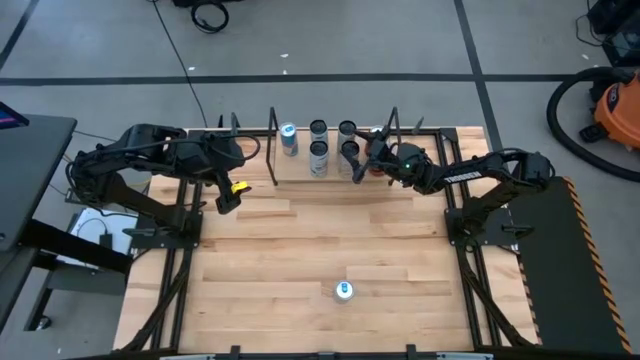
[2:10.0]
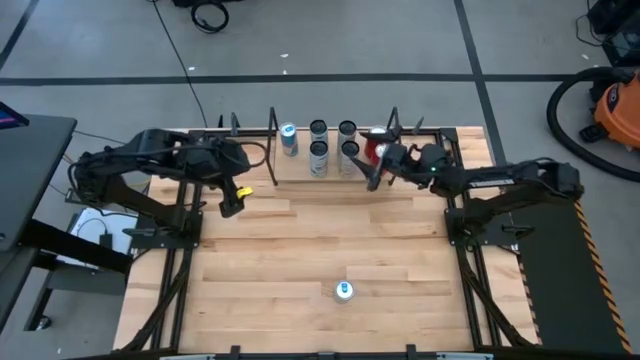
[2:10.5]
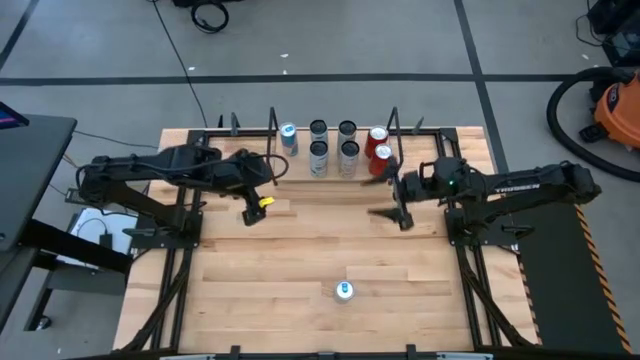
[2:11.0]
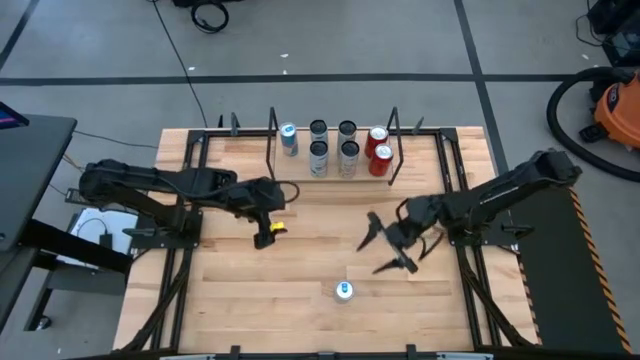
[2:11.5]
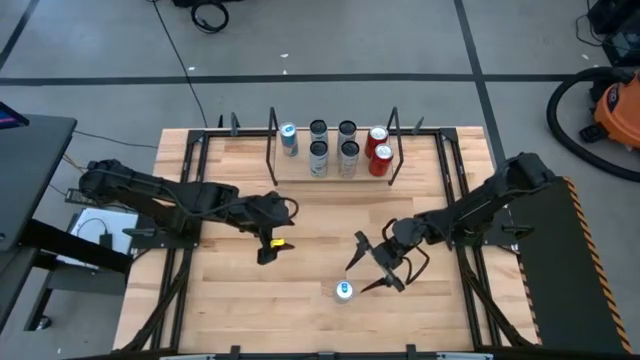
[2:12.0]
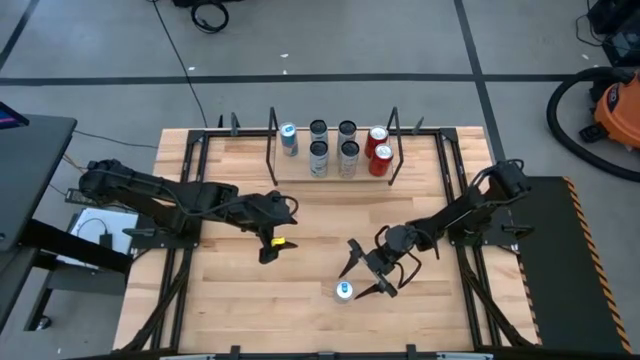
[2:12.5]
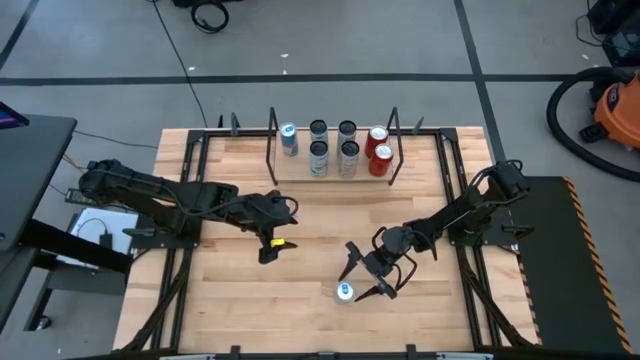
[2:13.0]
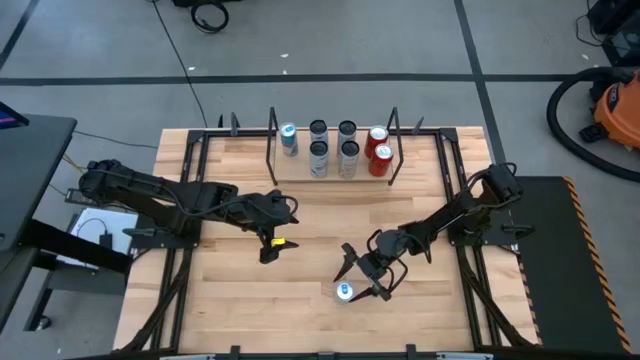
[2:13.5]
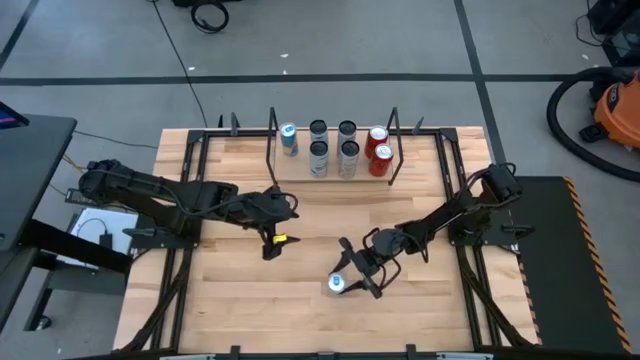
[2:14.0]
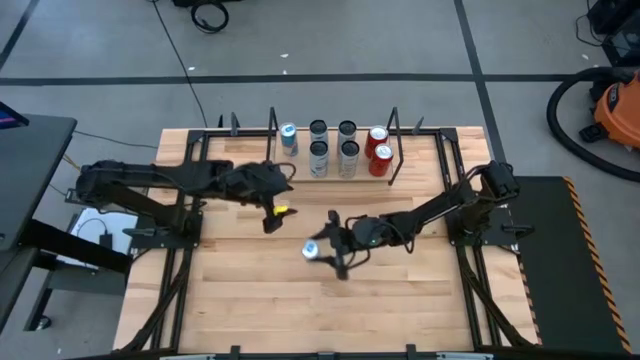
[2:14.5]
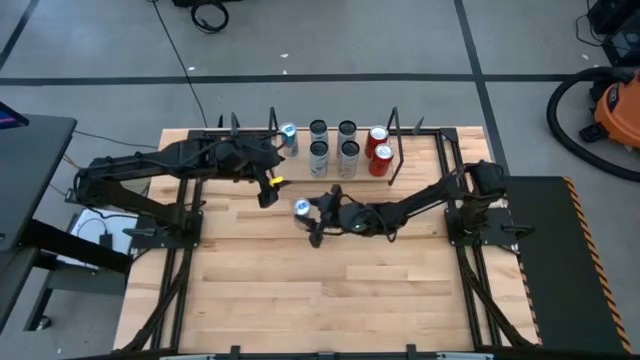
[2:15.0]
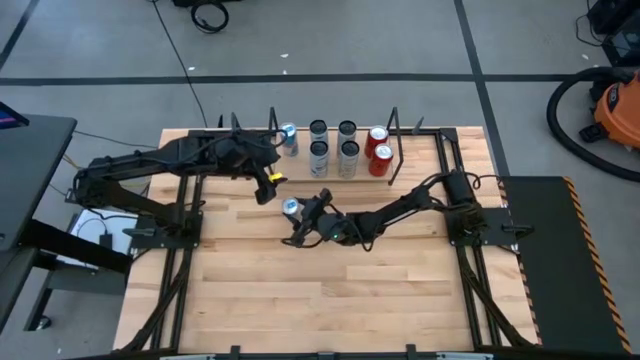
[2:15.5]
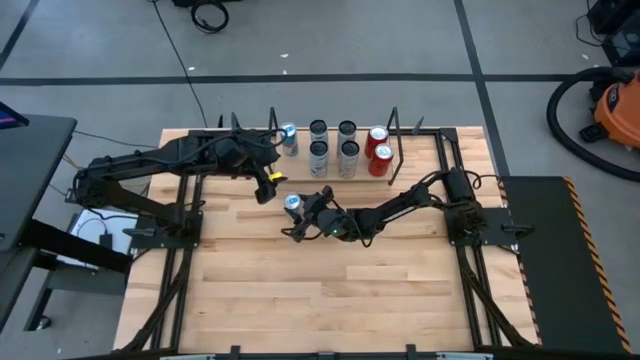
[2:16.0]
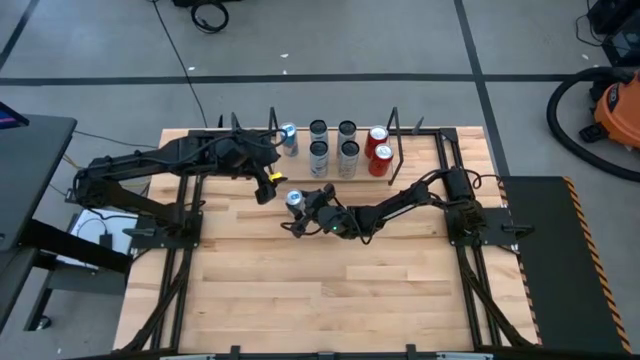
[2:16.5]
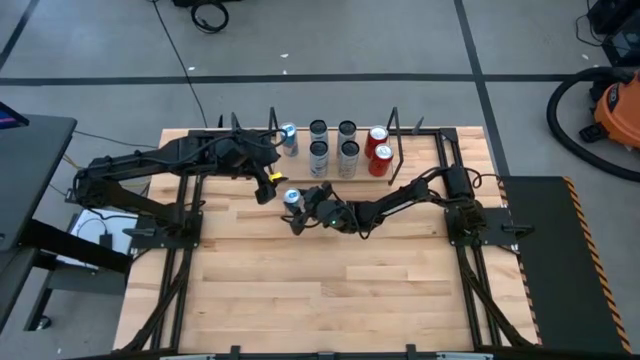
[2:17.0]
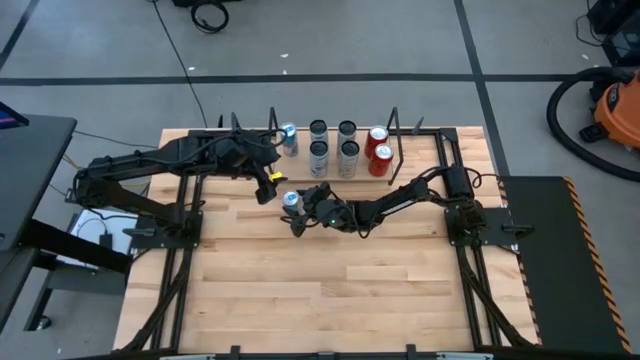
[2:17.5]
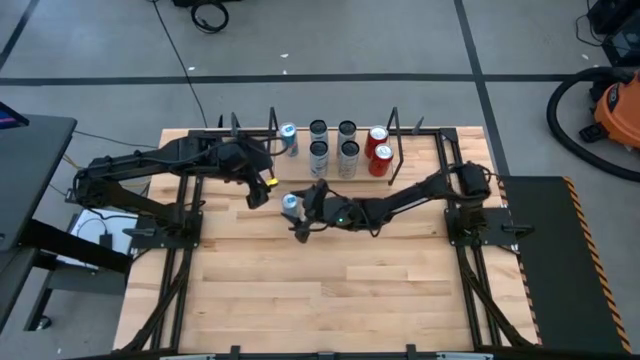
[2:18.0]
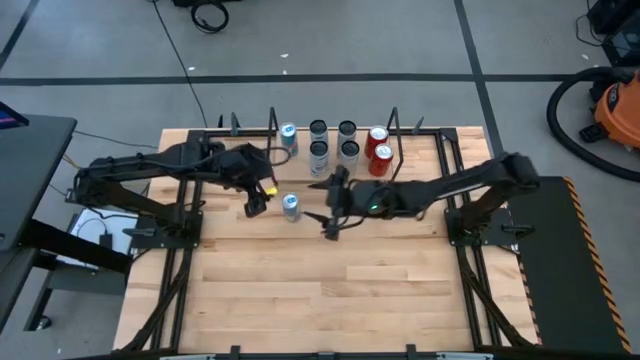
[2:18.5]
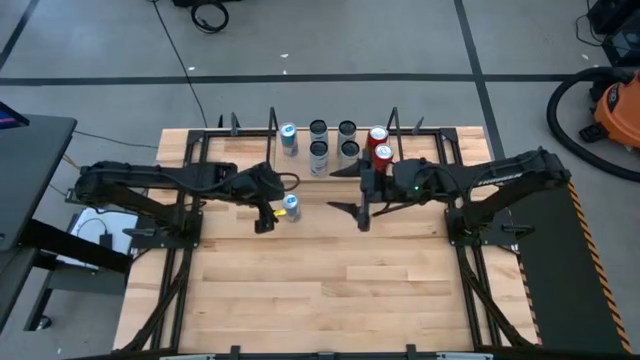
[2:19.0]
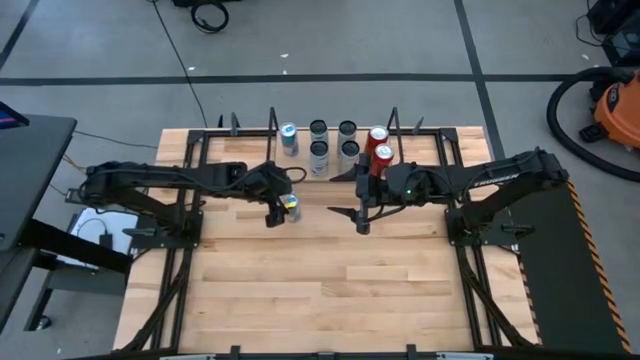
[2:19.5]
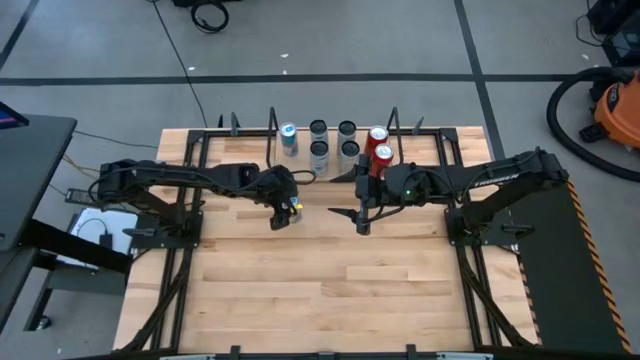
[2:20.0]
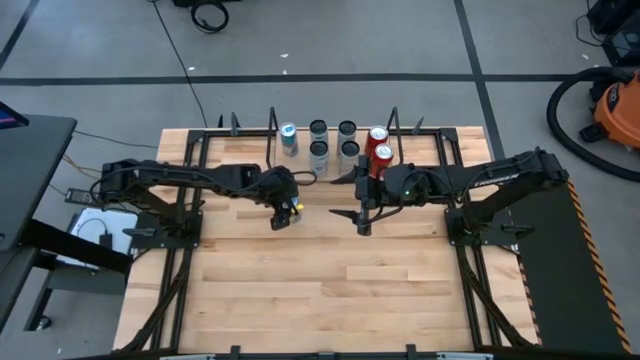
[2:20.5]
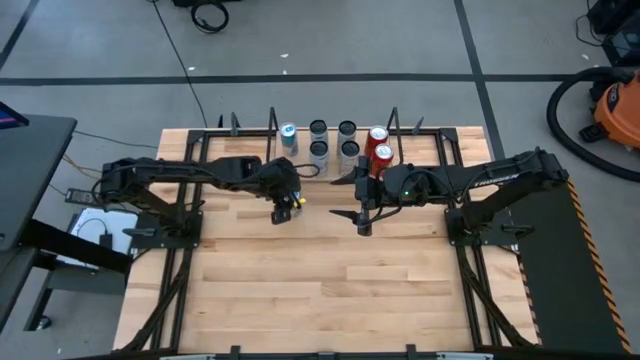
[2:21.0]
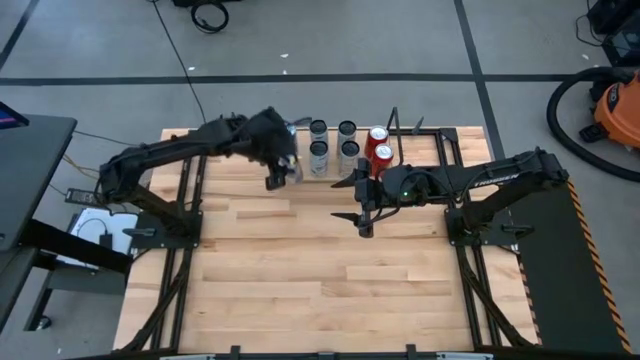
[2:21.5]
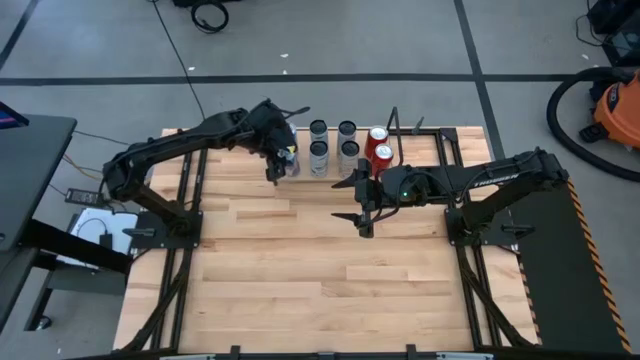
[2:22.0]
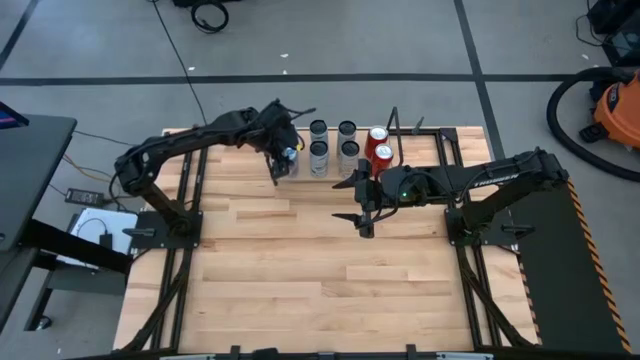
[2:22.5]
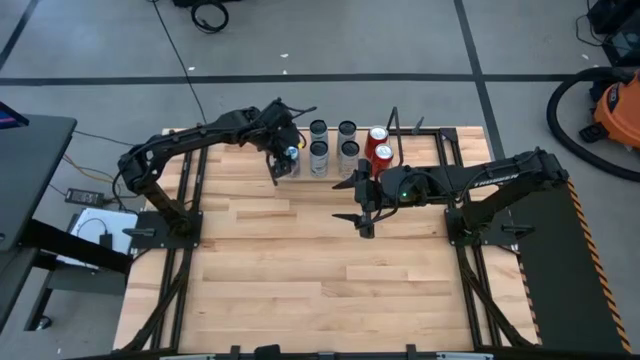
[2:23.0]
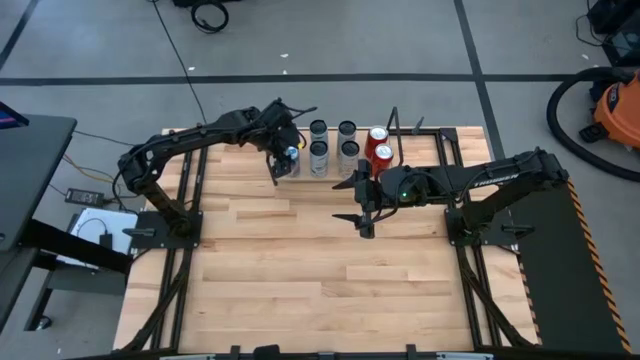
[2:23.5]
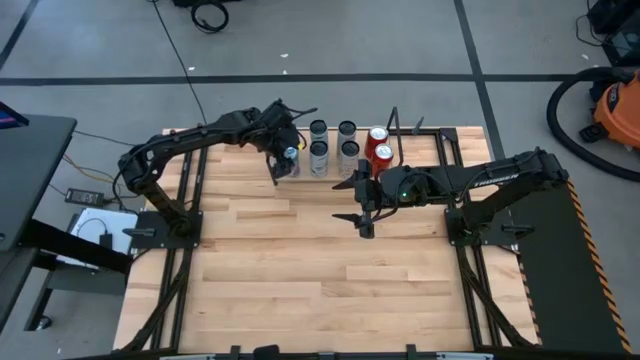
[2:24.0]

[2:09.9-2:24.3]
Task: Place canned beverage on shelf
Put the blue soda can aligned with the other blue soda can on the shelf

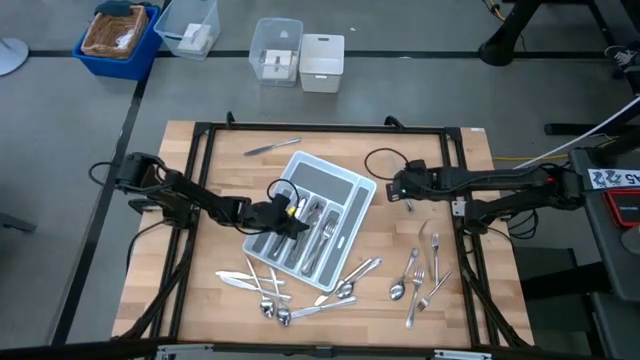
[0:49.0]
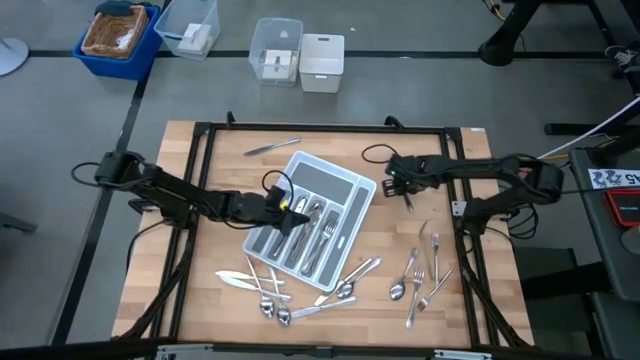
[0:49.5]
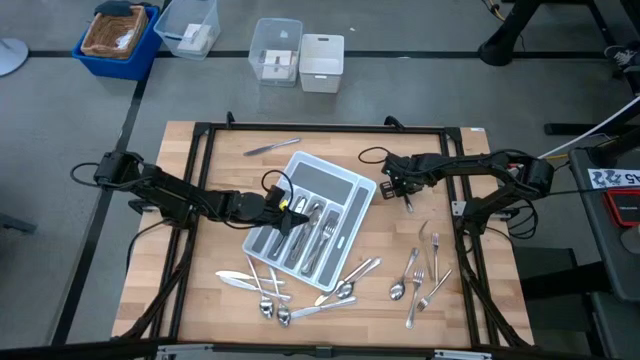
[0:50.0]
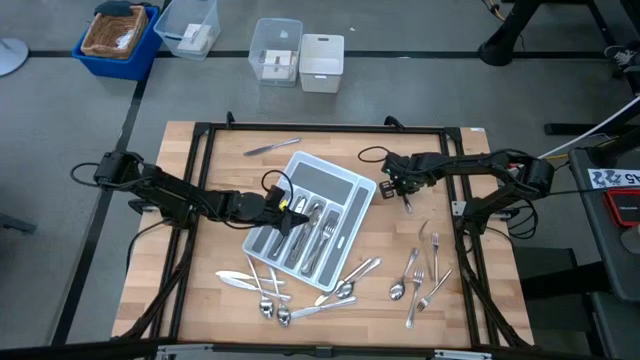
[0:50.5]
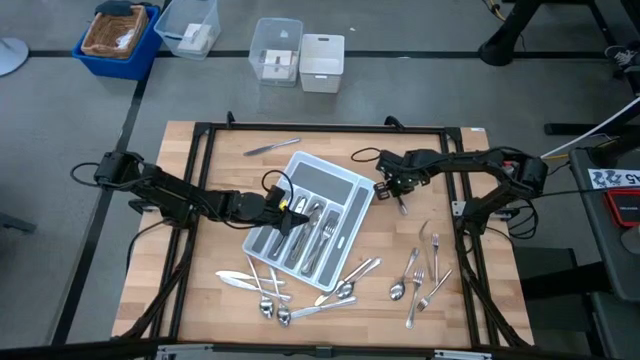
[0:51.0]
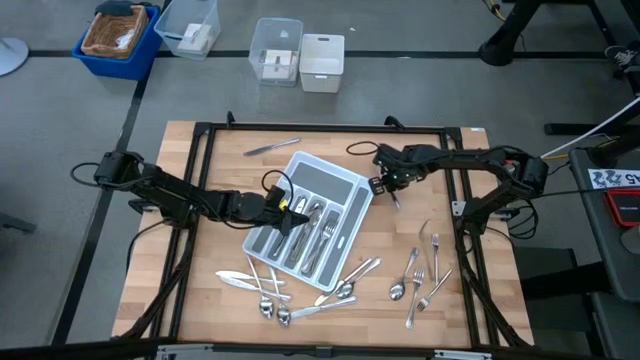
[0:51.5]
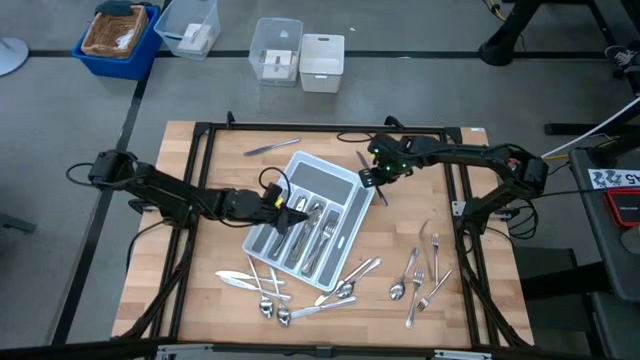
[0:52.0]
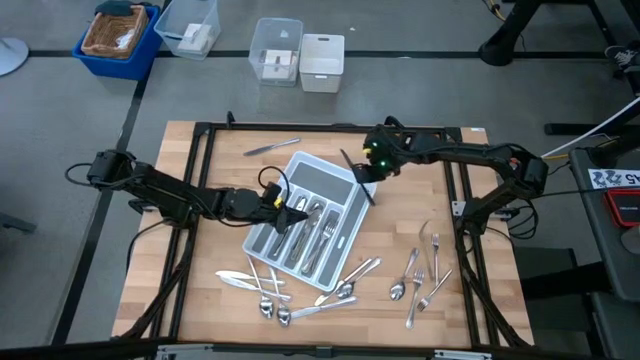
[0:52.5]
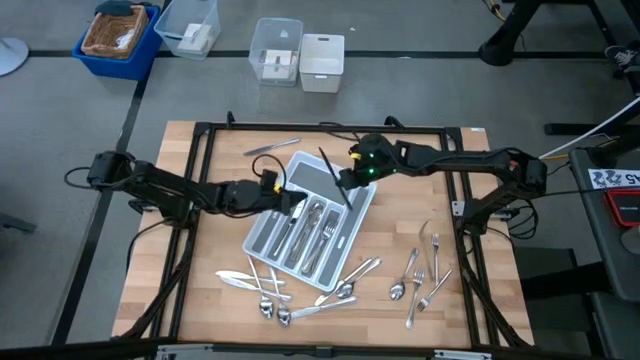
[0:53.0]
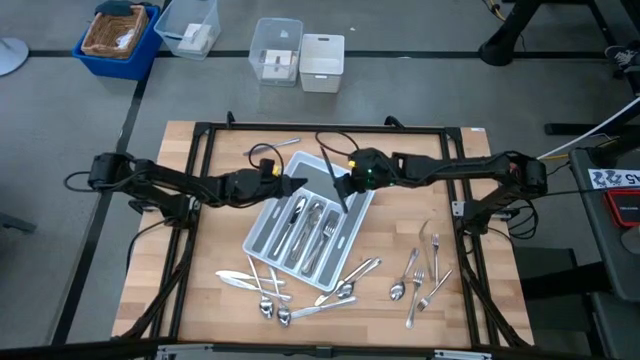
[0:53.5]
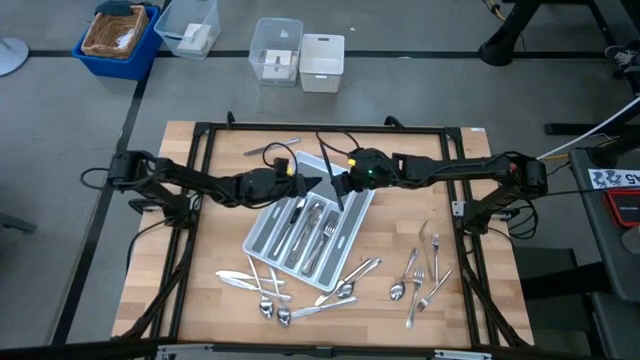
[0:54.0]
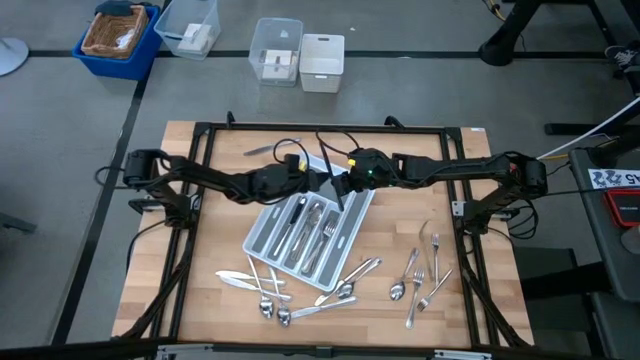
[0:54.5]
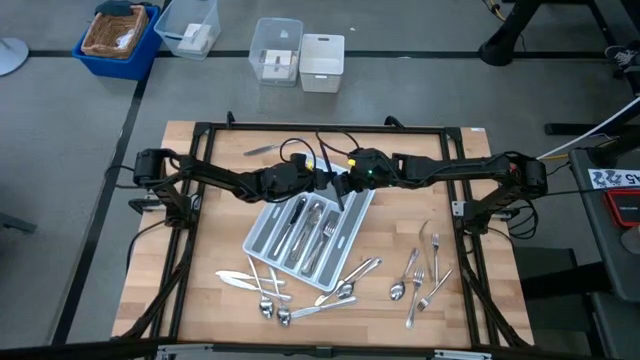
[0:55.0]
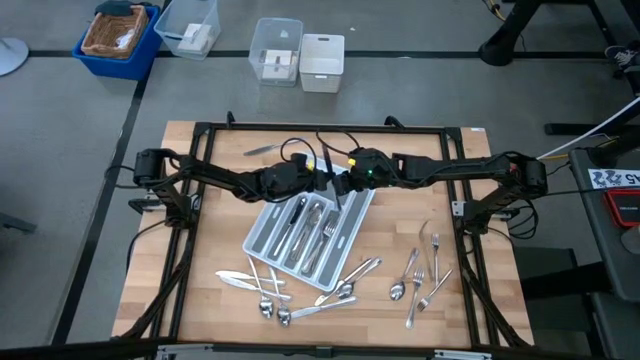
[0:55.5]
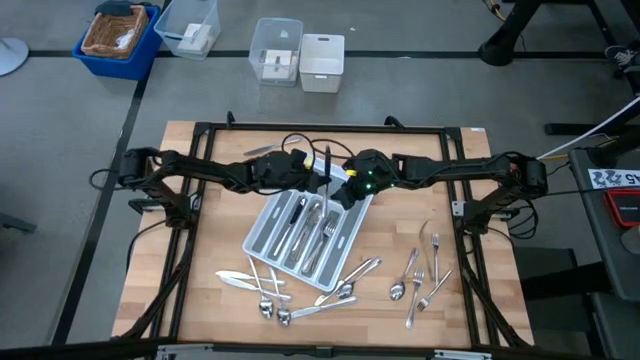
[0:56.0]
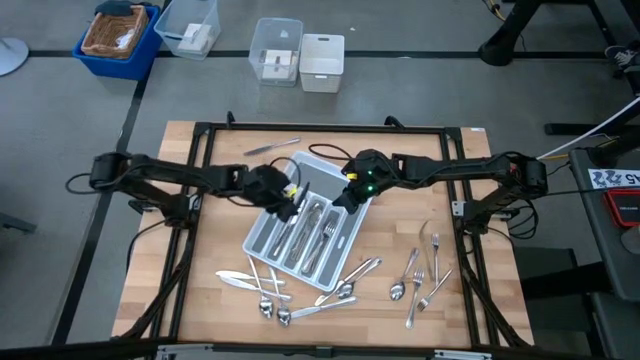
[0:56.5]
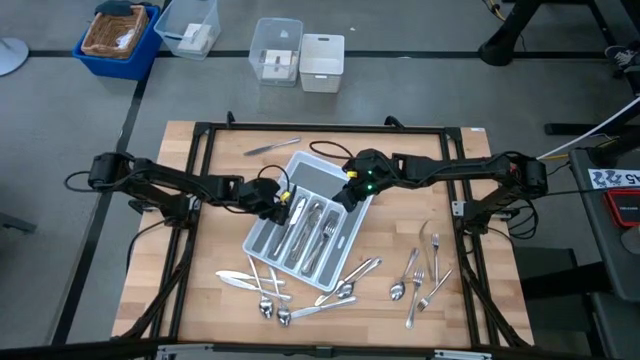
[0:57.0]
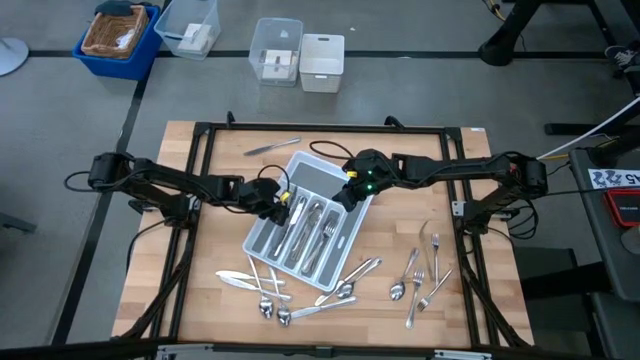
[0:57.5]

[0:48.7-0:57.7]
Task: Sort silverware
Put the silver knife into the white cutlery tray
